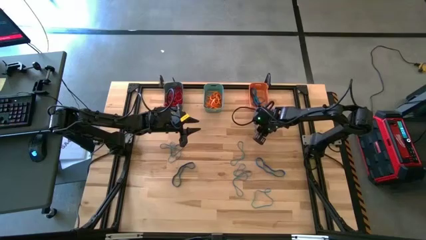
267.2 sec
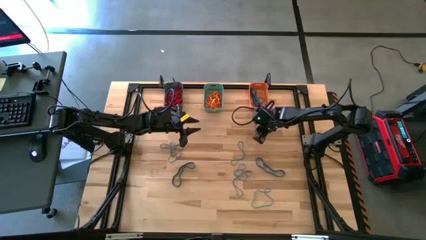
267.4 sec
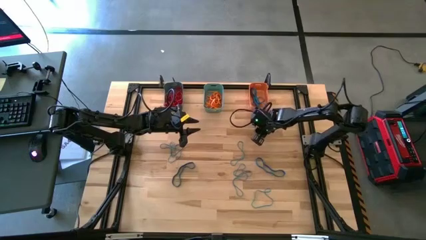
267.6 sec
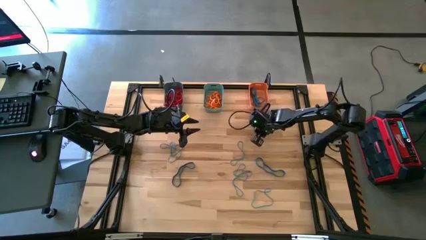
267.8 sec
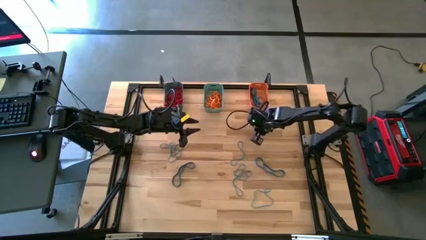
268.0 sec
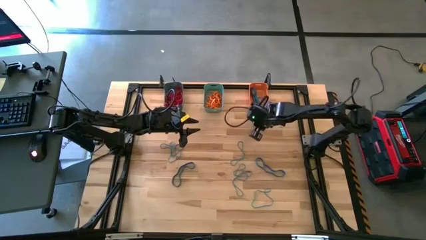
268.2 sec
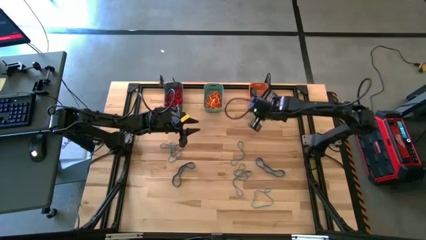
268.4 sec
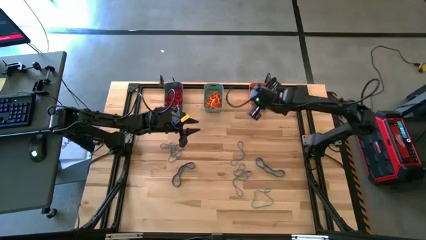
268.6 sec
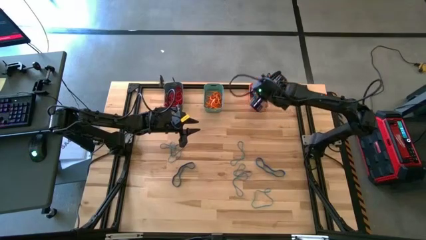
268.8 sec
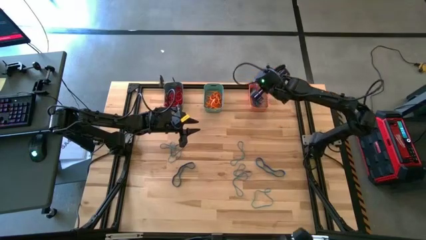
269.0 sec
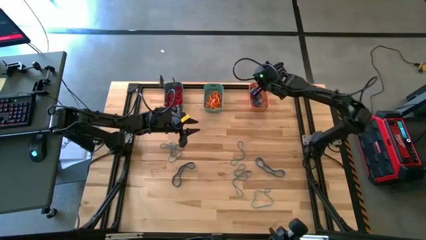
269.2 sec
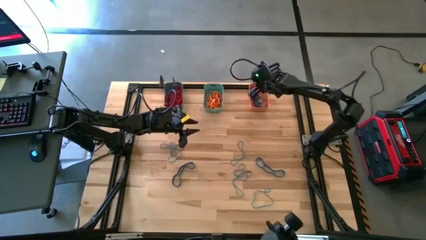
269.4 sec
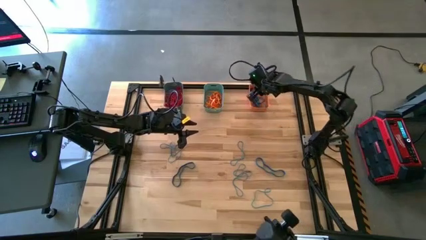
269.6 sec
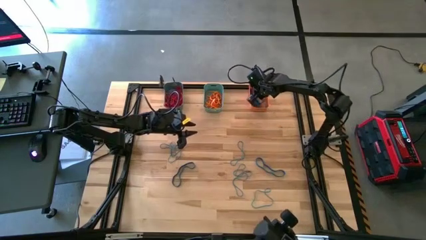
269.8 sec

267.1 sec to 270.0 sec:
Task: Sort rubber bands into baskets
Put the blue rubber band into the orange bin

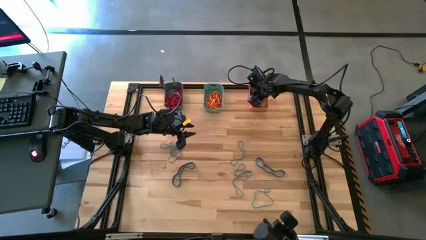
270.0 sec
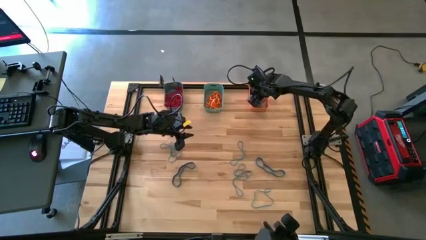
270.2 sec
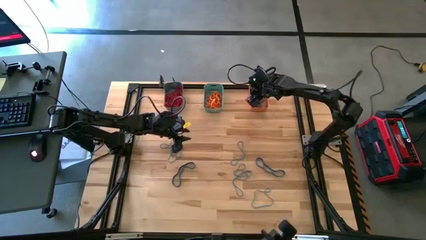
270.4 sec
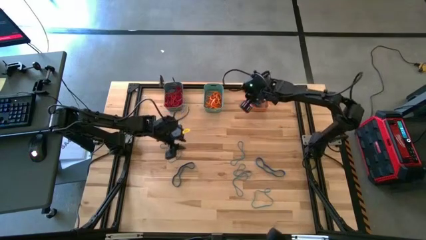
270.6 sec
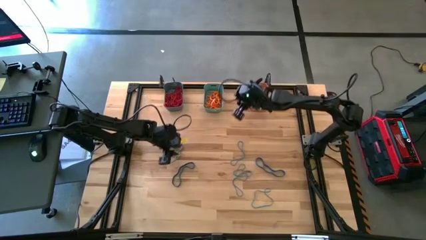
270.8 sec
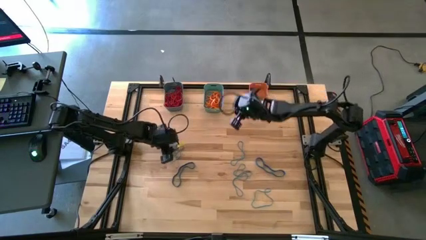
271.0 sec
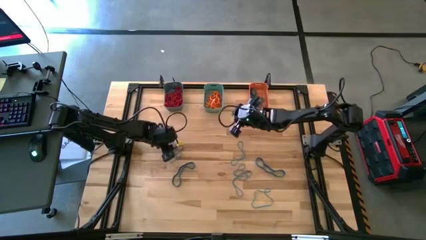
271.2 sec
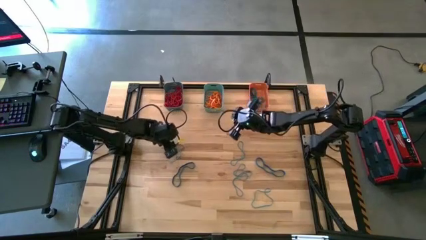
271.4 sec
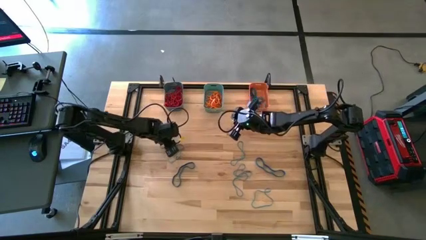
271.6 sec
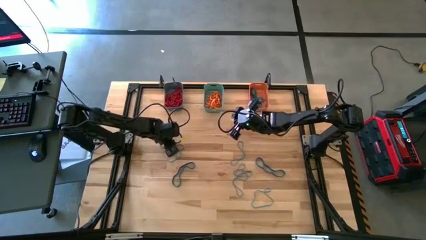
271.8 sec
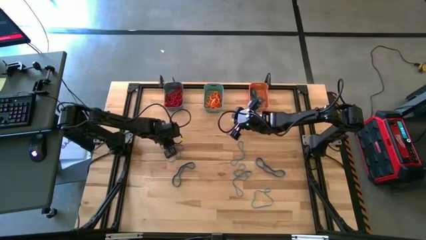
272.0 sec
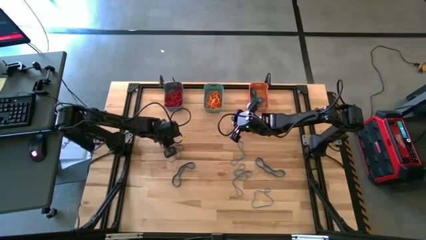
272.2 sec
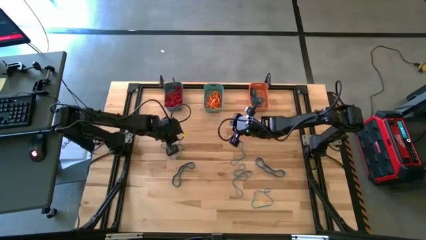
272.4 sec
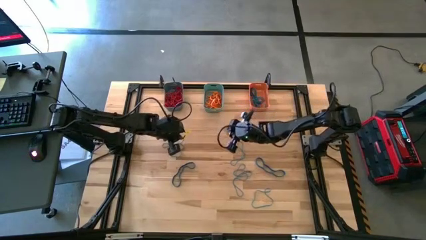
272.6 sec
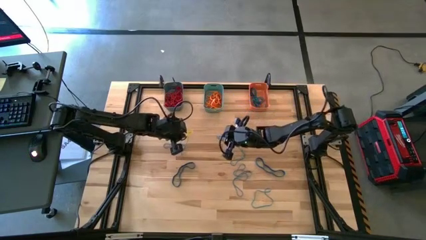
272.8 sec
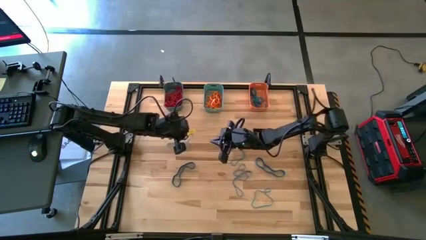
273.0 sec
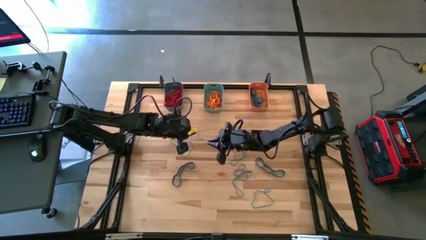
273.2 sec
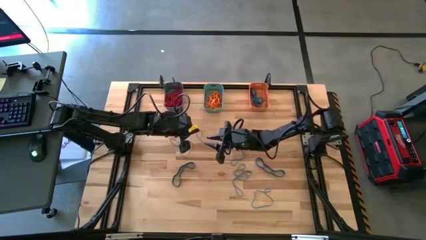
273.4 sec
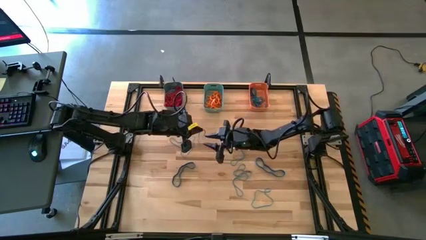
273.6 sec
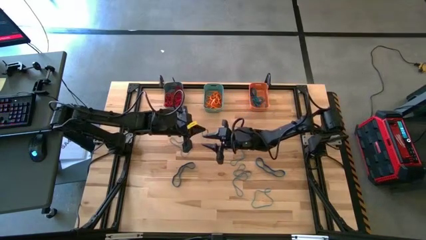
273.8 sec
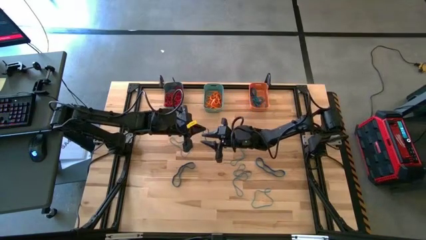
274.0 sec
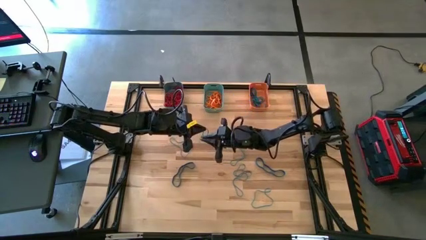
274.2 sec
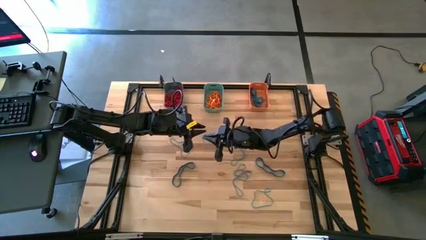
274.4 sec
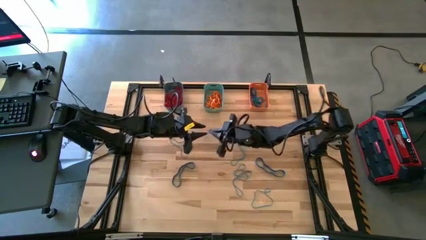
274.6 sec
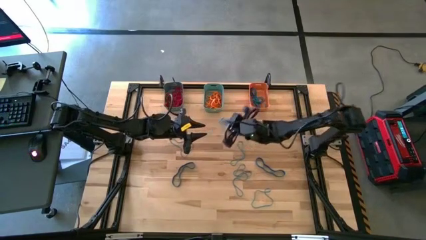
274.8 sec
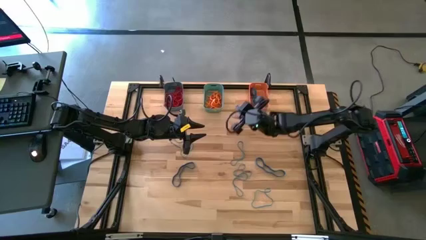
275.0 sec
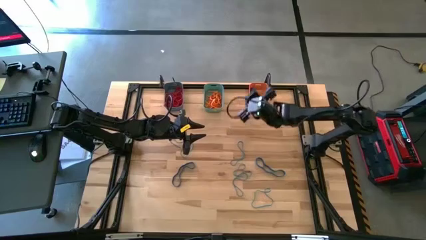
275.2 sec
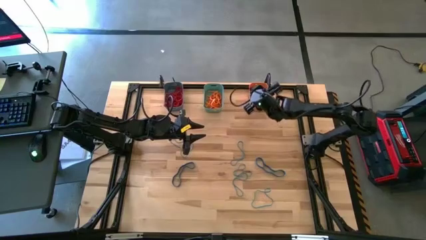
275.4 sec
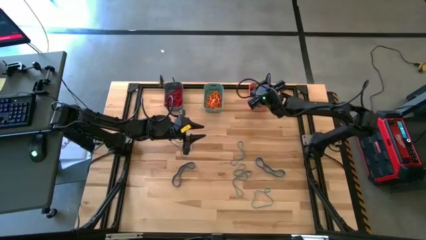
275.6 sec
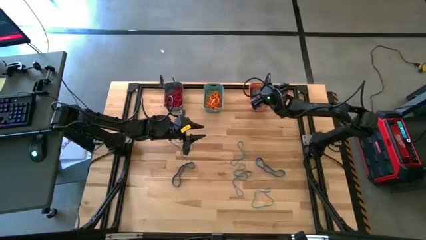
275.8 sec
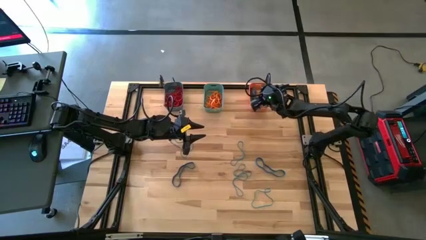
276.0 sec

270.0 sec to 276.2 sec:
Put the blue rubber band into the orange bin

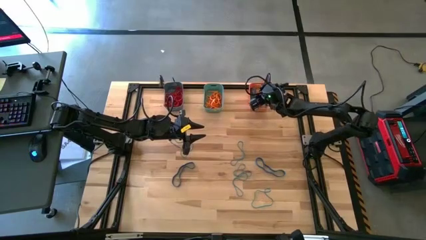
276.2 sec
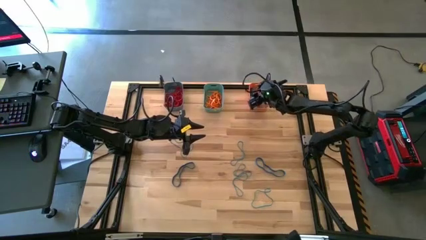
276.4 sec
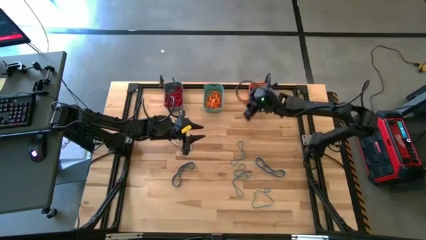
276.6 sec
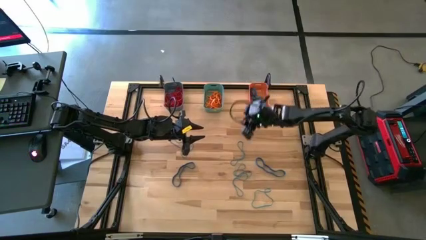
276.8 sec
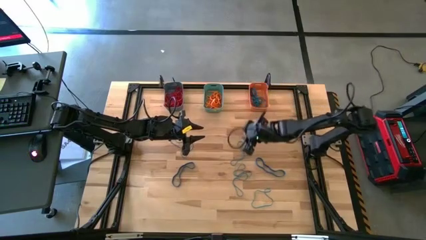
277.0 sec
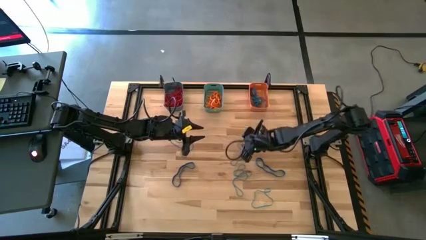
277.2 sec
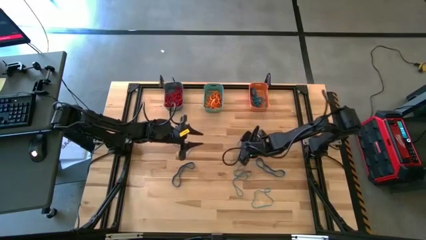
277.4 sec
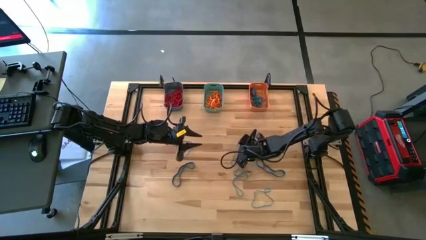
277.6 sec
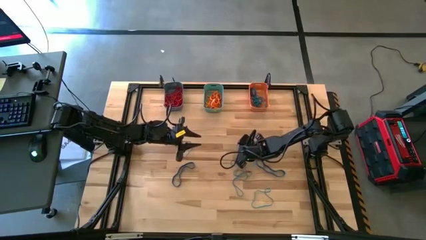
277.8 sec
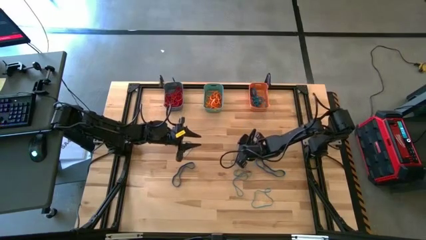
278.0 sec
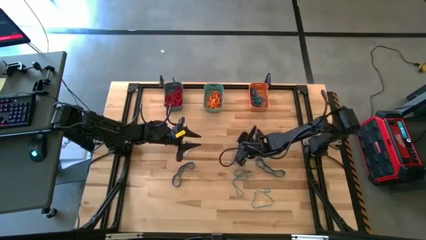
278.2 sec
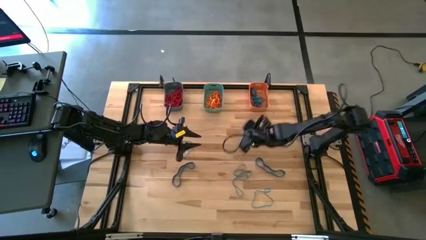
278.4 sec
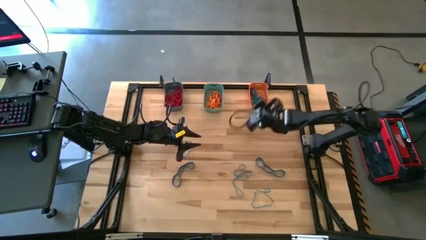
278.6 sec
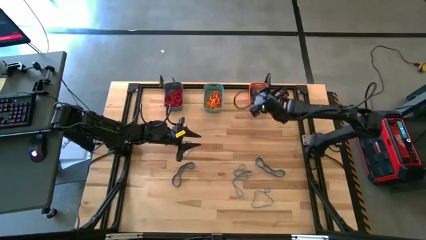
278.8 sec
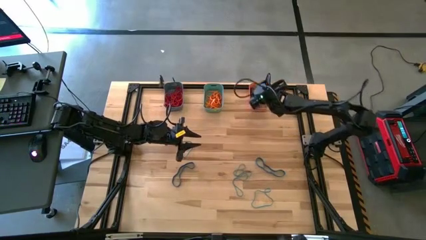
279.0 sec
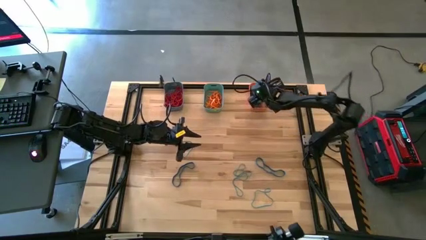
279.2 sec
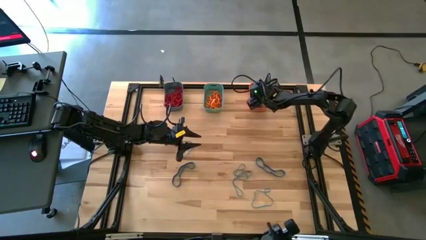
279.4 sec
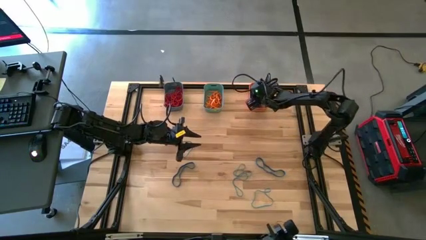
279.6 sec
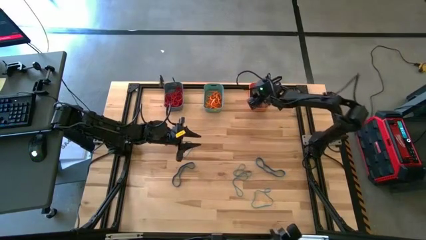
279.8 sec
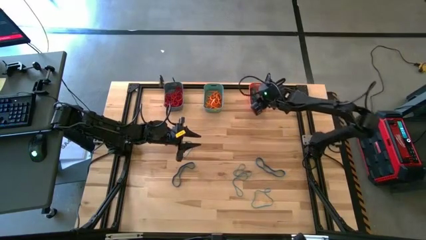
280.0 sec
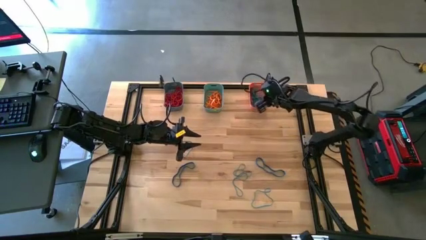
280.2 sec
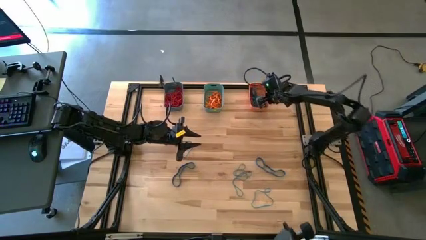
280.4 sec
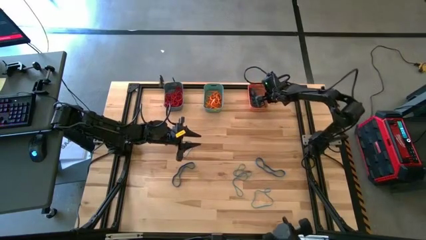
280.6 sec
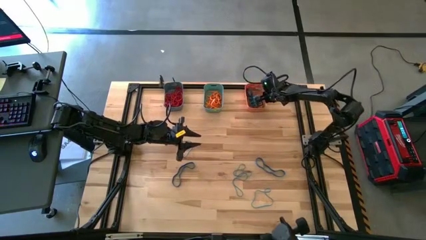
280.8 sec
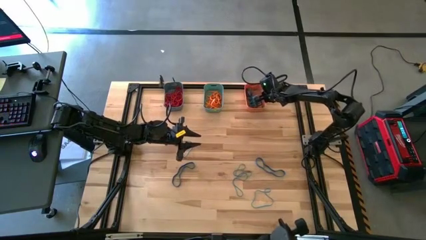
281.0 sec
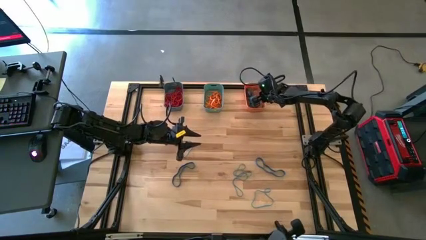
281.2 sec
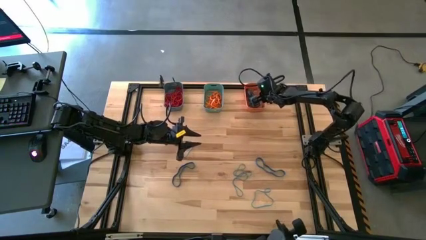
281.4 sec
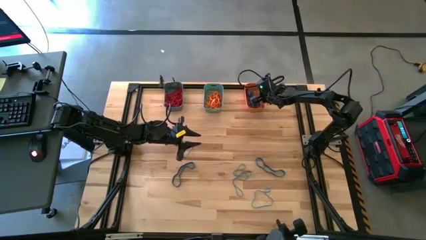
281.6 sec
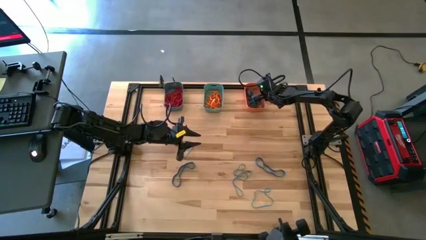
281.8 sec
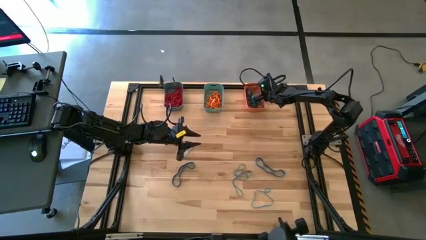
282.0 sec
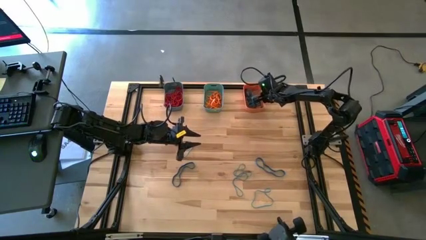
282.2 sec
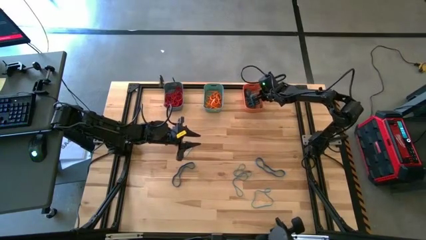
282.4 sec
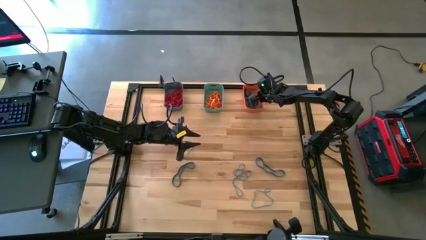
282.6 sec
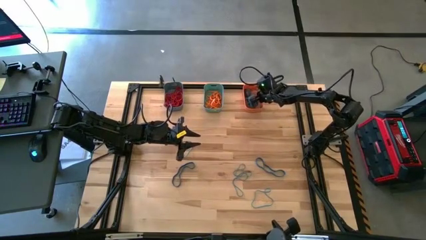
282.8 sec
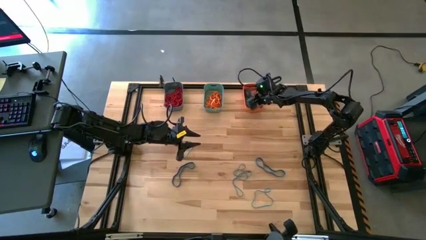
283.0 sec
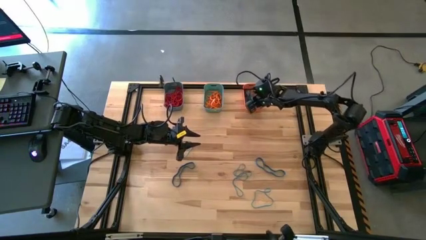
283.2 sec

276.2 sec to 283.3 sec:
Put the blue rubber band into the orange bin
